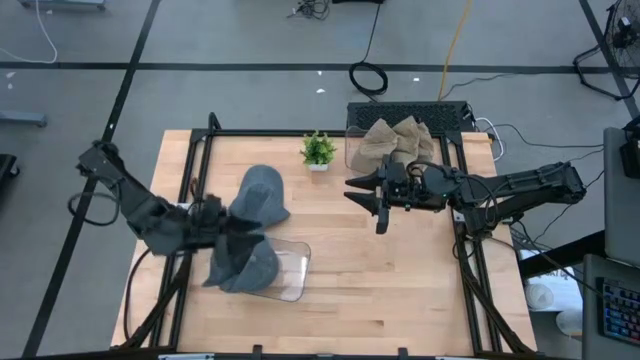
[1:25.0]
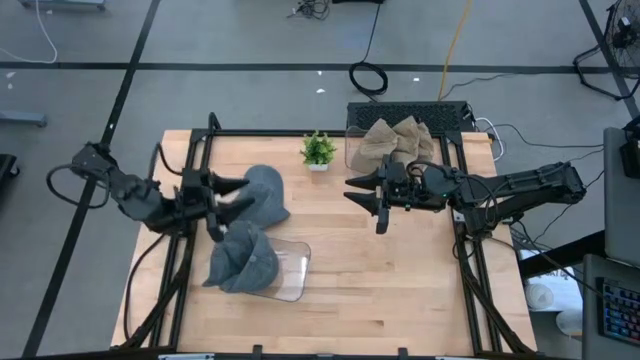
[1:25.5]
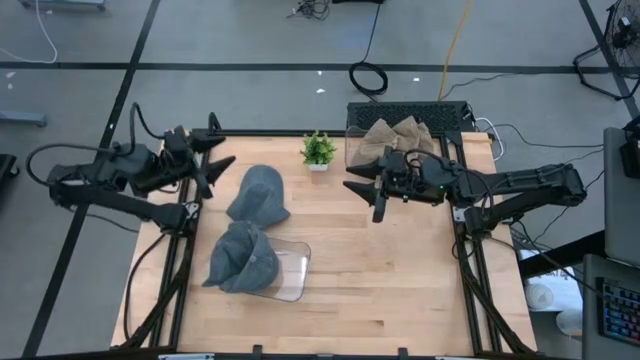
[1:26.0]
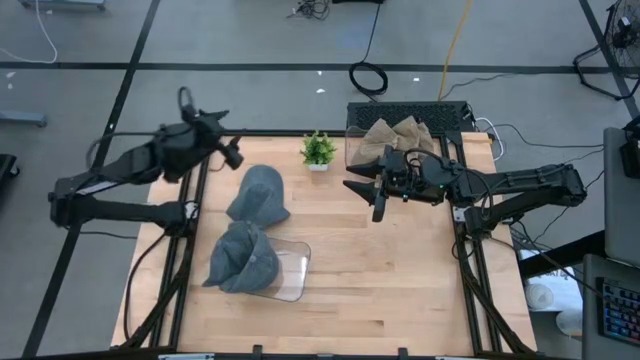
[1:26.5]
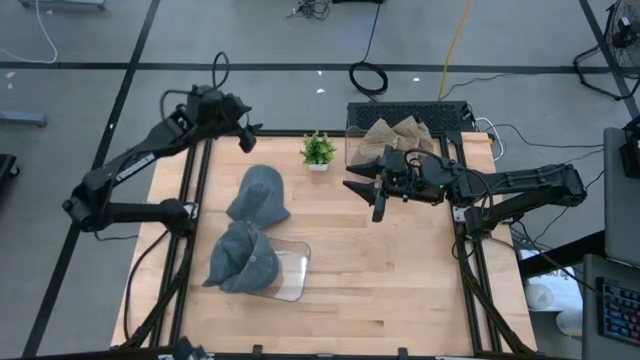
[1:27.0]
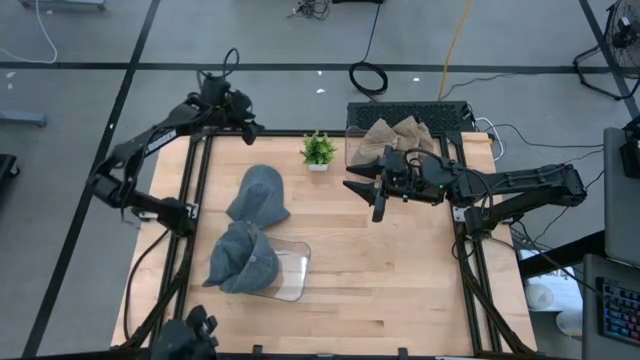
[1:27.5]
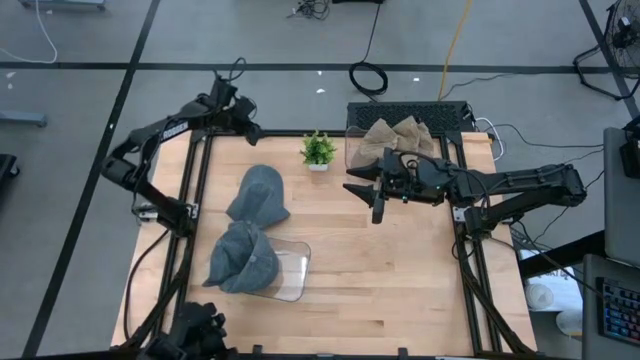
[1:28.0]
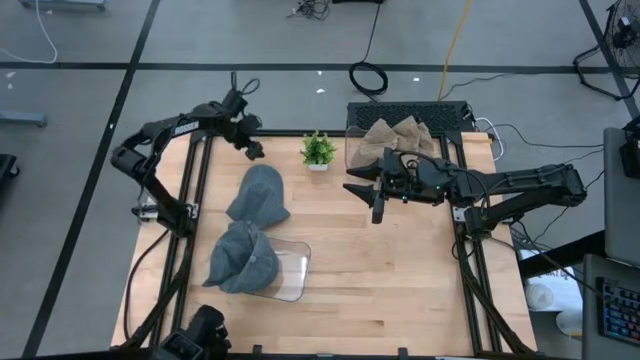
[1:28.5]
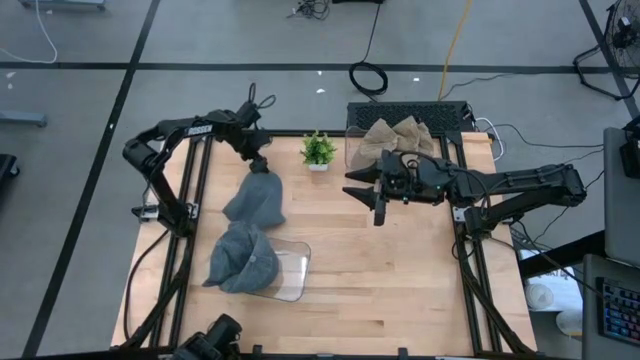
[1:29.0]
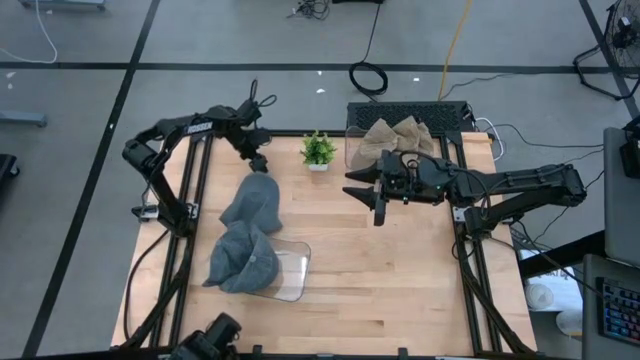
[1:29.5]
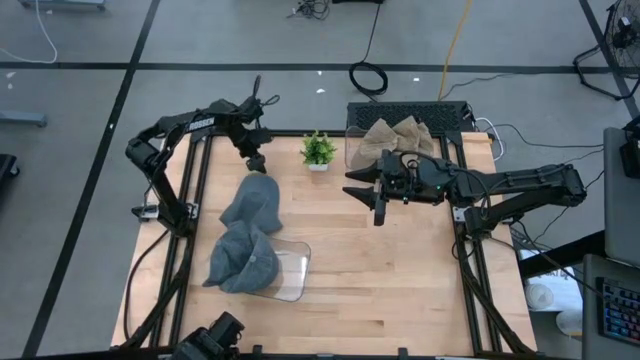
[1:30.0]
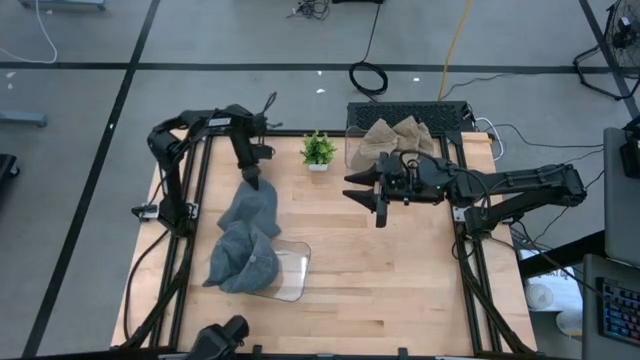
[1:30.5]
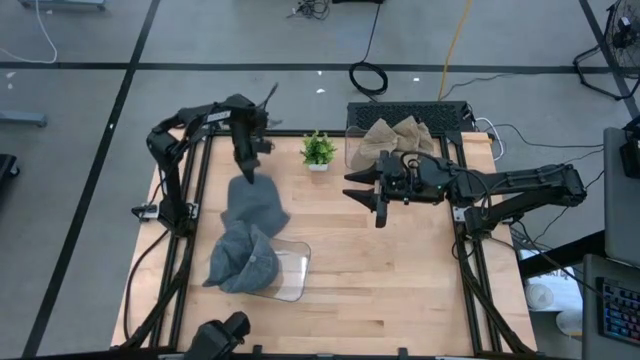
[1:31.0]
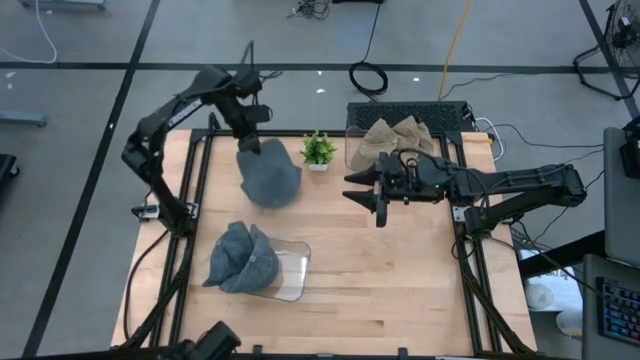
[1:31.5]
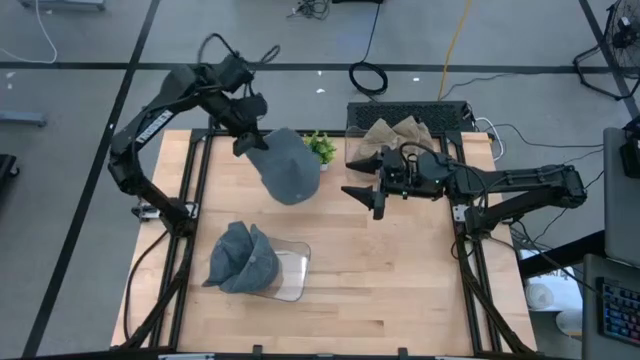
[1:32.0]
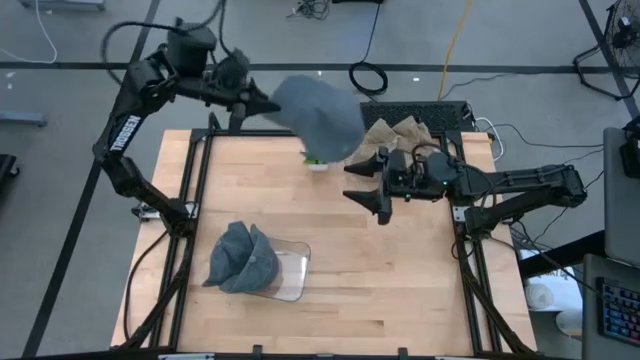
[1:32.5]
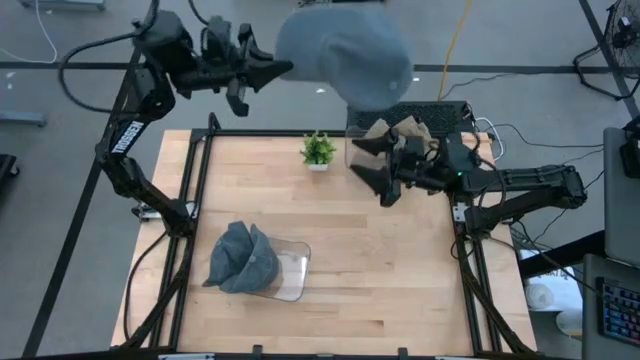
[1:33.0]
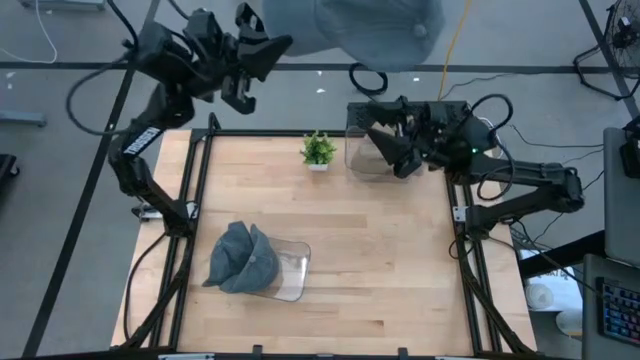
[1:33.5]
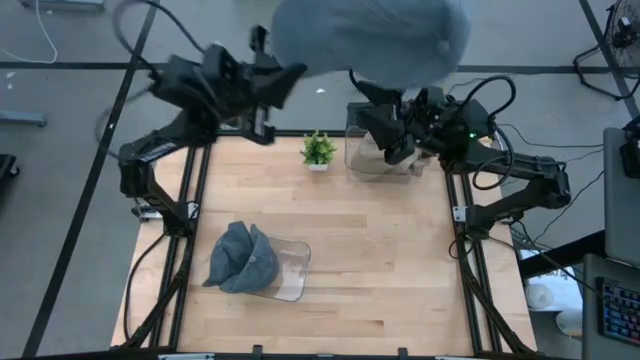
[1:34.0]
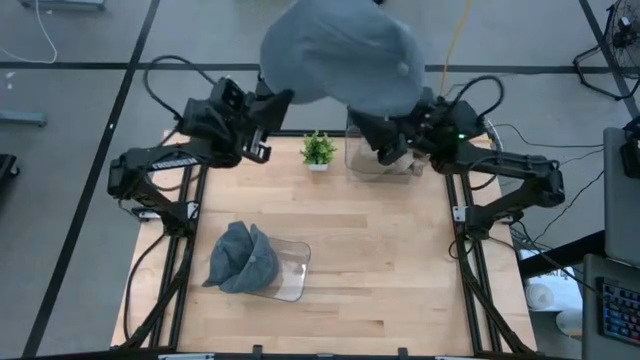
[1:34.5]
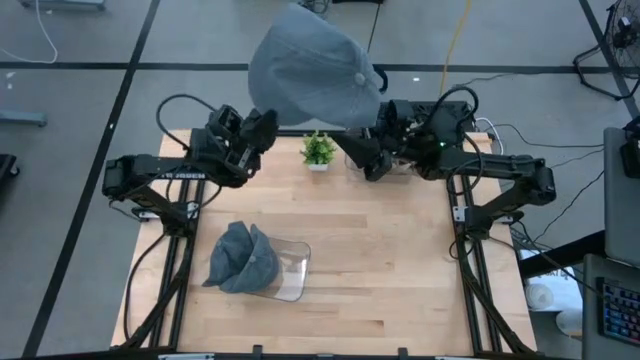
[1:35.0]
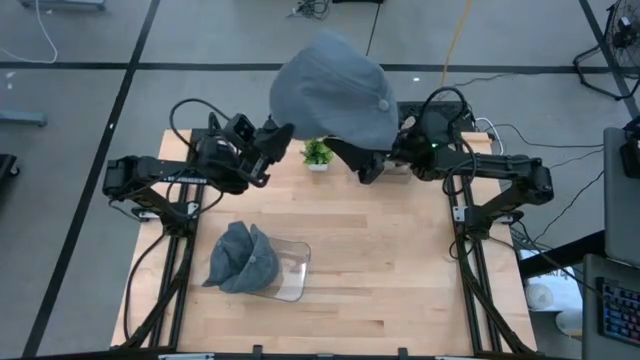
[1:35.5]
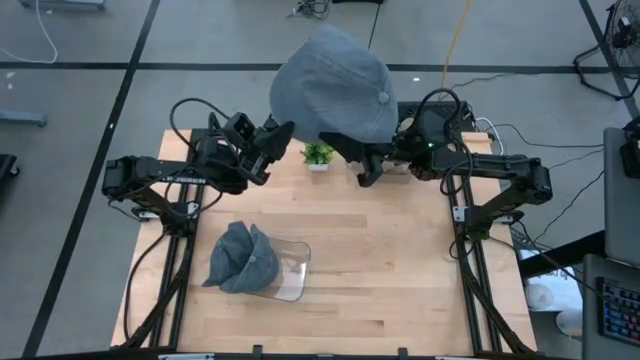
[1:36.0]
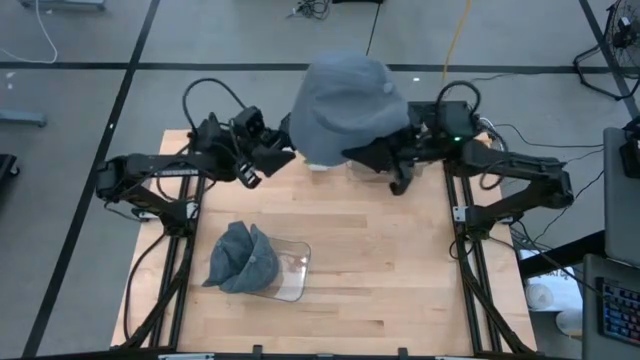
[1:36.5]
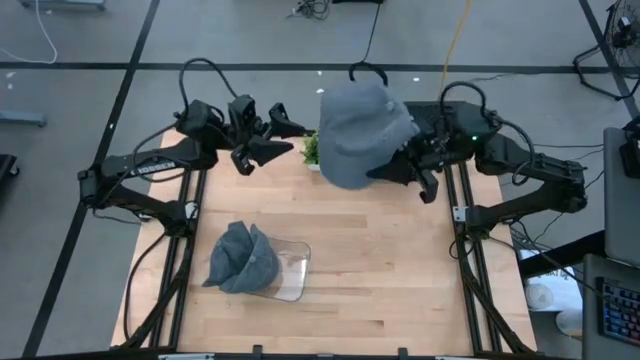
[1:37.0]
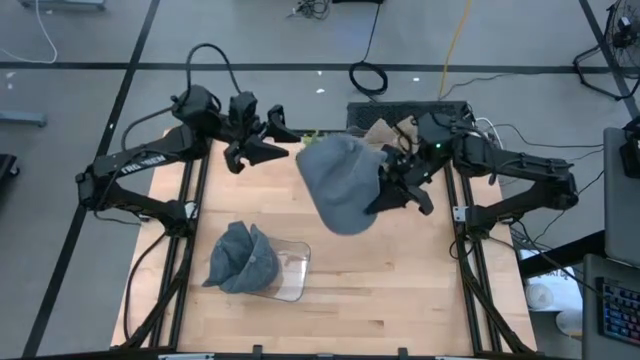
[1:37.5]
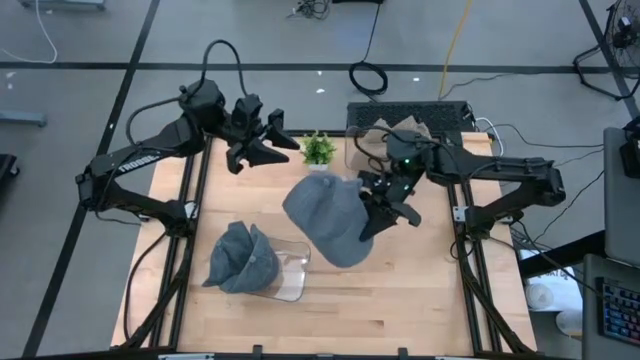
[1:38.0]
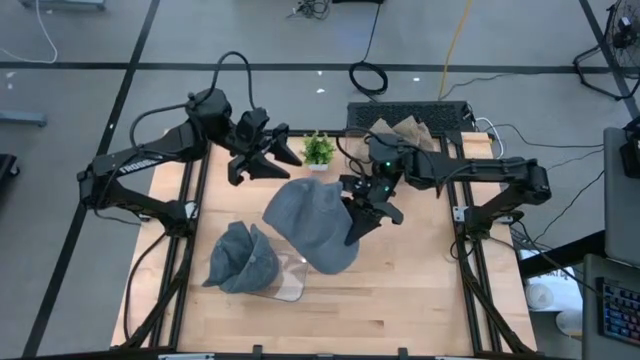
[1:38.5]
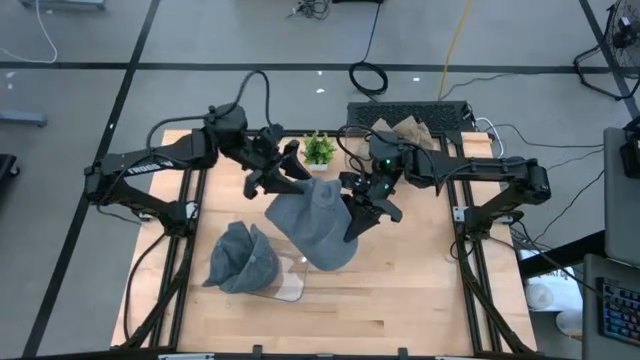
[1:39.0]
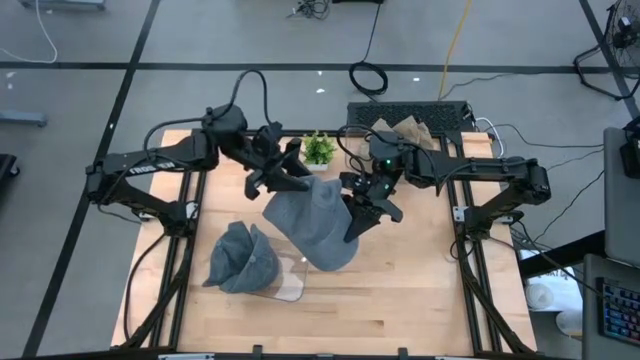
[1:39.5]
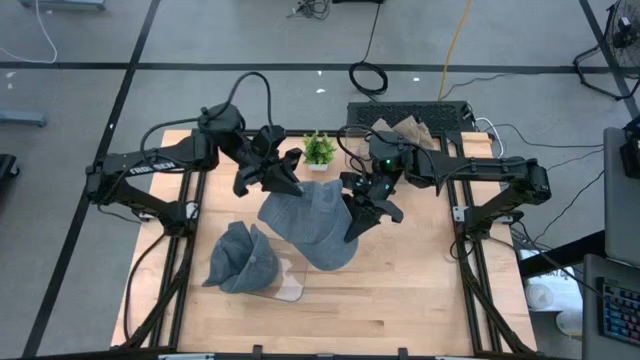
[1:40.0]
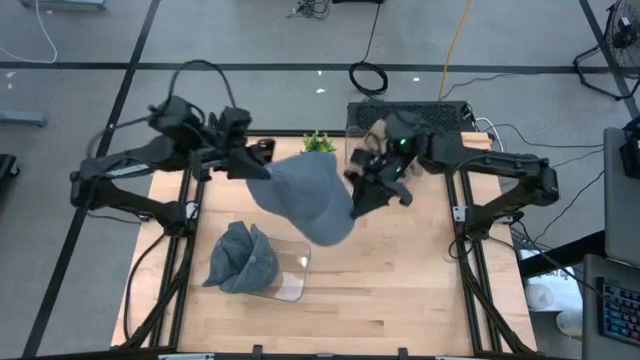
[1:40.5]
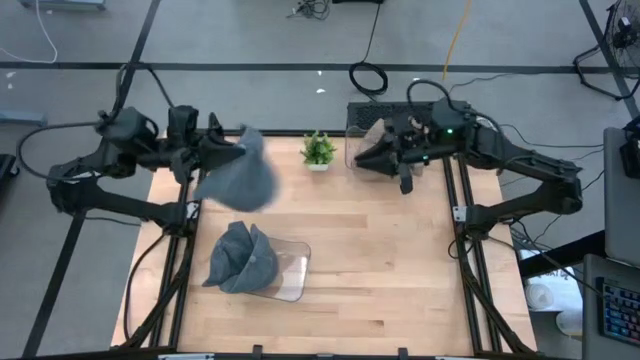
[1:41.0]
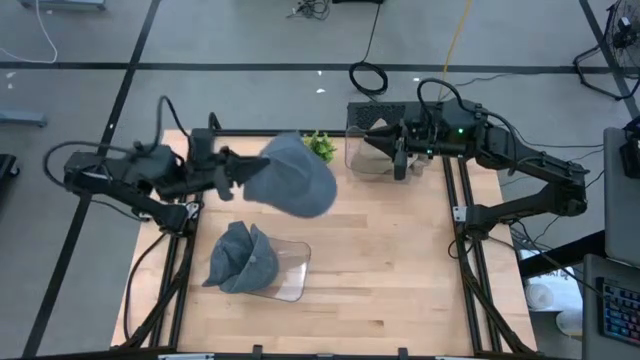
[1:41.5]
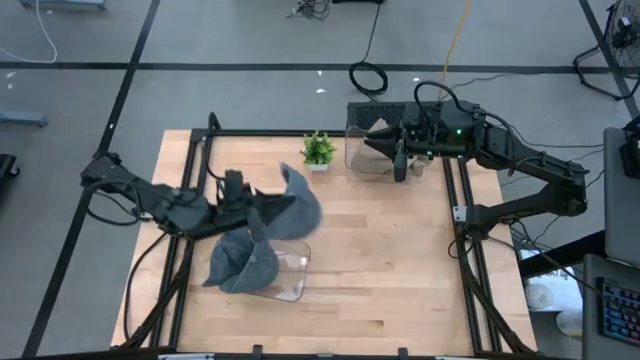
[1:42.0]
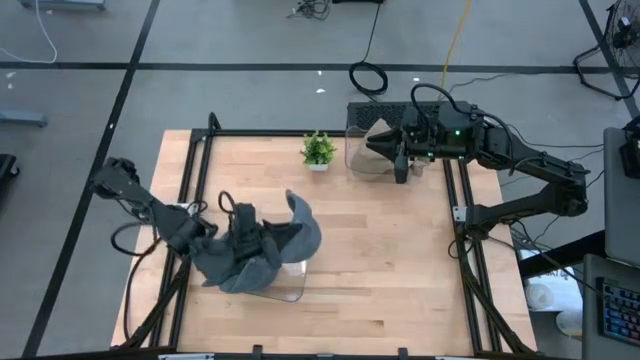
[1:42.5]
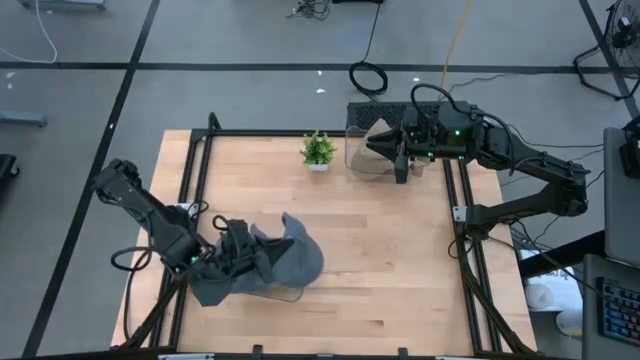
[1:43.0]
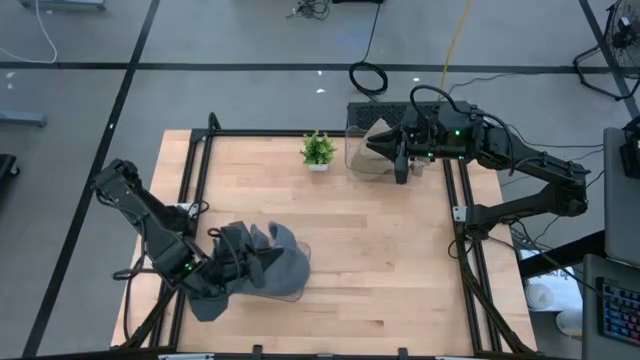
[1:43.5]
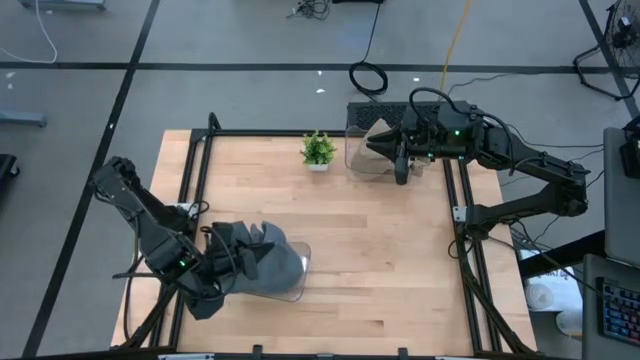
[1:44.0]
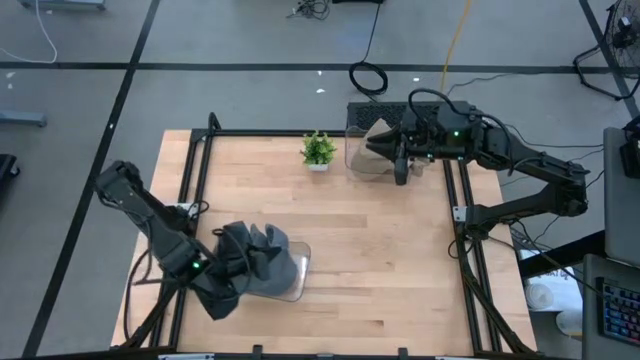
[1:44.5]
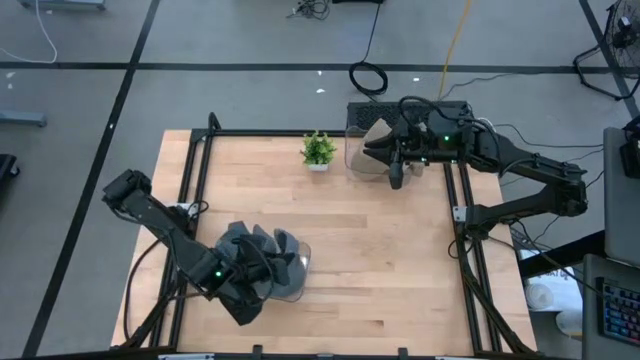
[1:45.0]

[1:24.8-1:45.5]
Task: Pick & Place hat
Put the gray cap into the bottom transparent bin

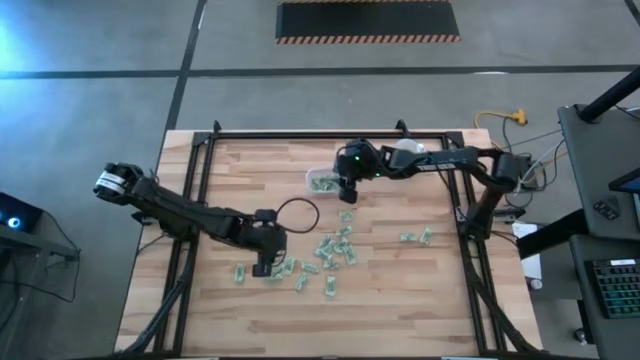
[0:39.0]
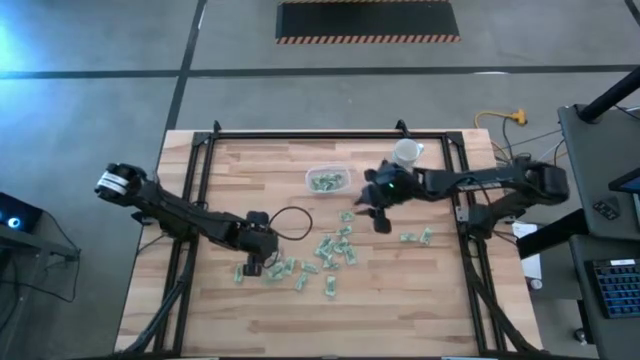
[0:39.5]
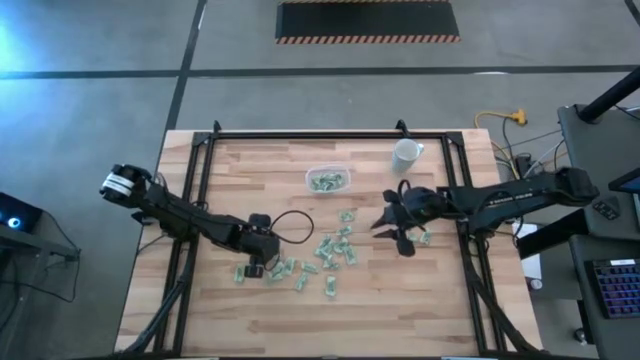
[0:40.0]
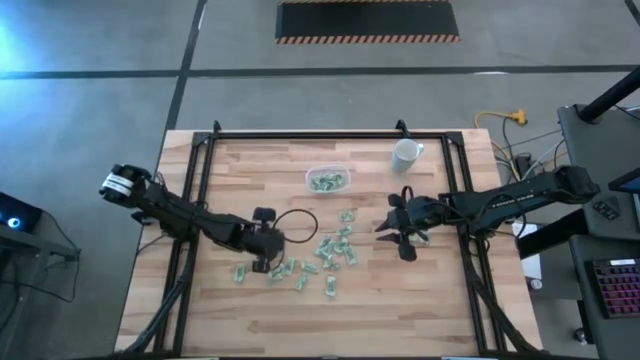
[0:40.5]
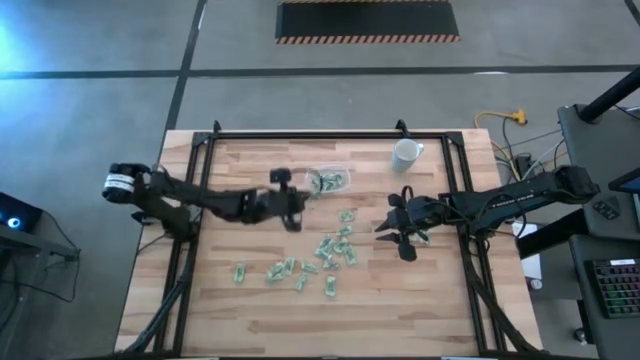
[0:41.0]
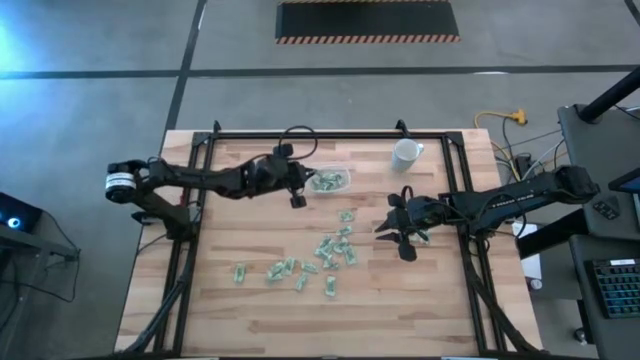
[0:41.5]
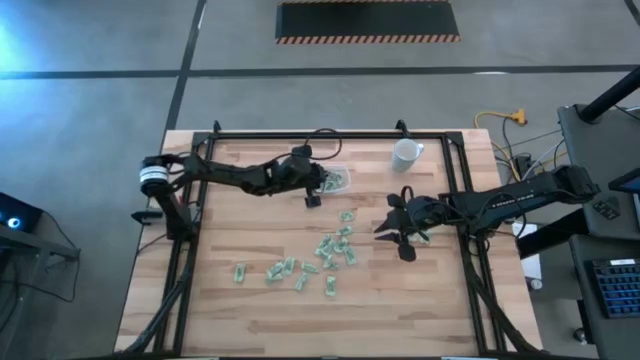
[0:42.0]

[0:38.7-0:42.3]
Task: Pick and place Stevia / Truvia into bins
Put the stevia packet into the transparent container
